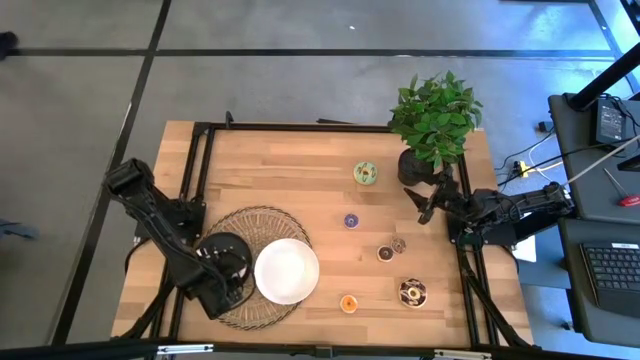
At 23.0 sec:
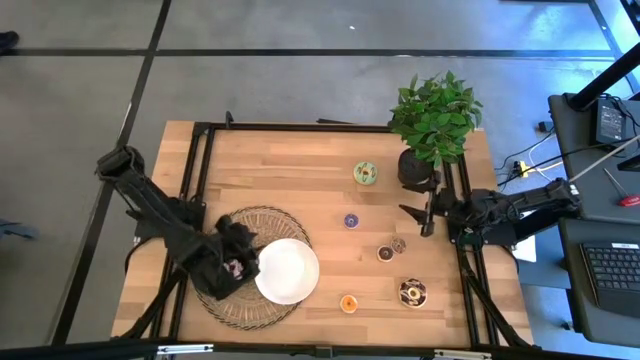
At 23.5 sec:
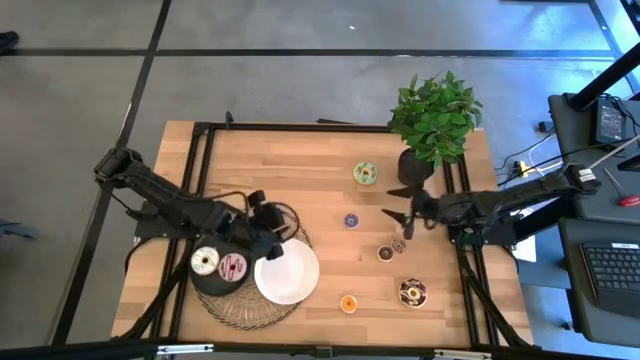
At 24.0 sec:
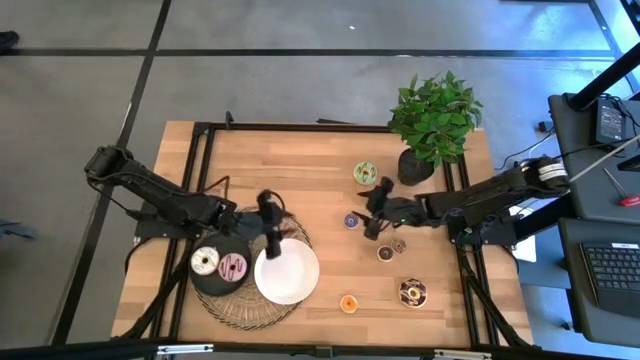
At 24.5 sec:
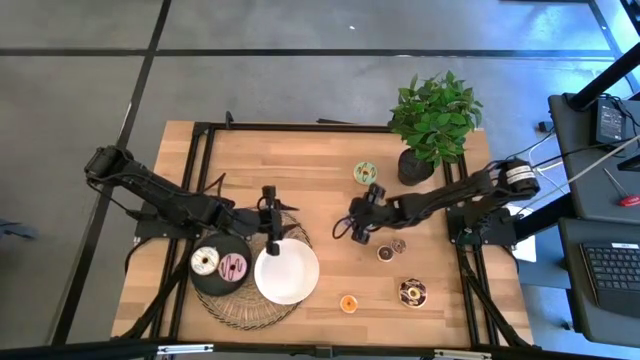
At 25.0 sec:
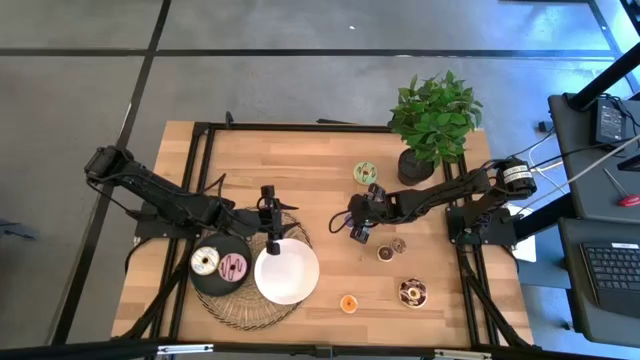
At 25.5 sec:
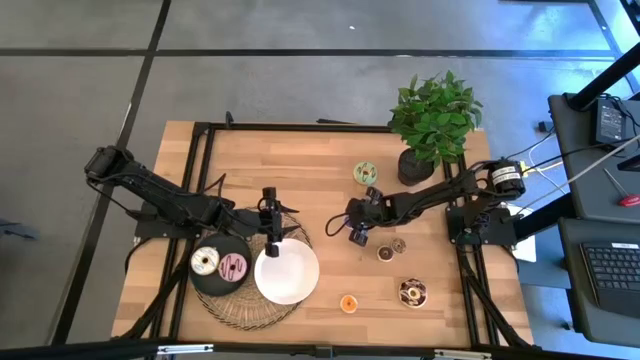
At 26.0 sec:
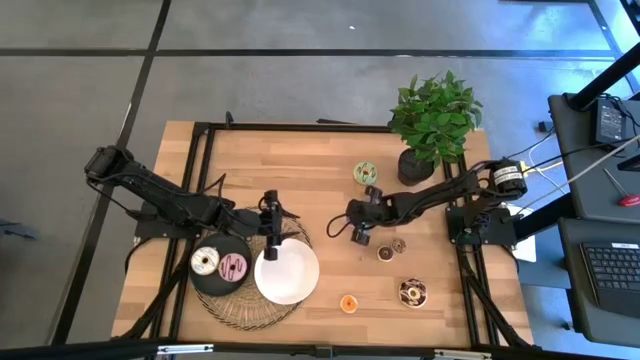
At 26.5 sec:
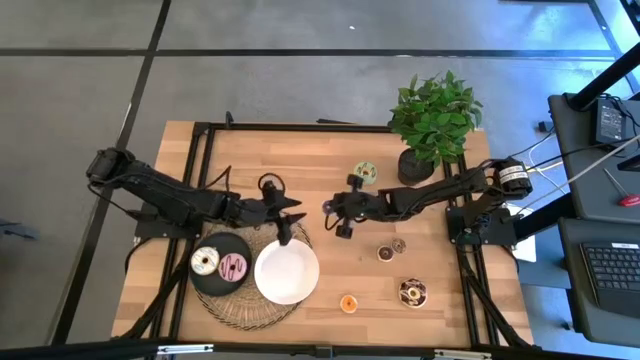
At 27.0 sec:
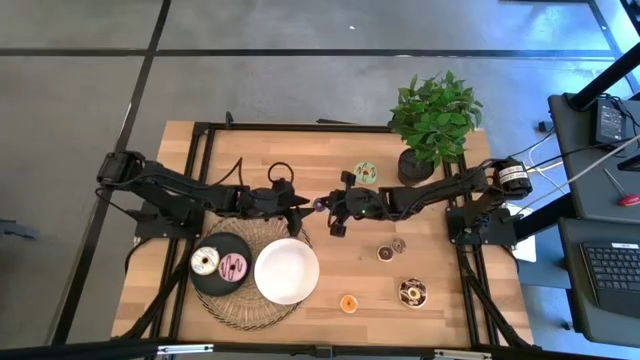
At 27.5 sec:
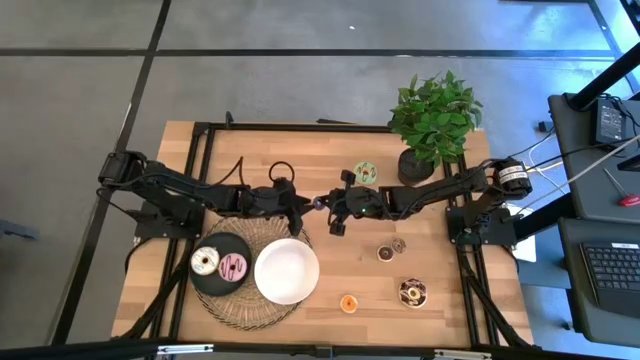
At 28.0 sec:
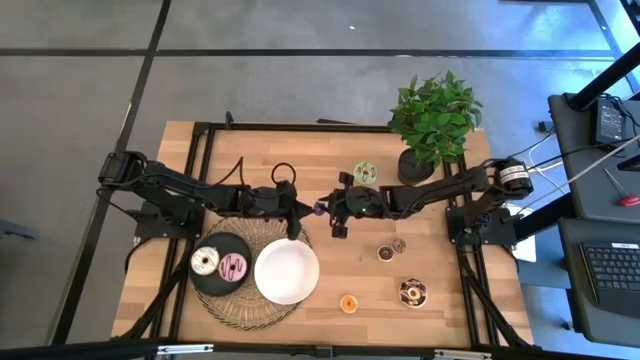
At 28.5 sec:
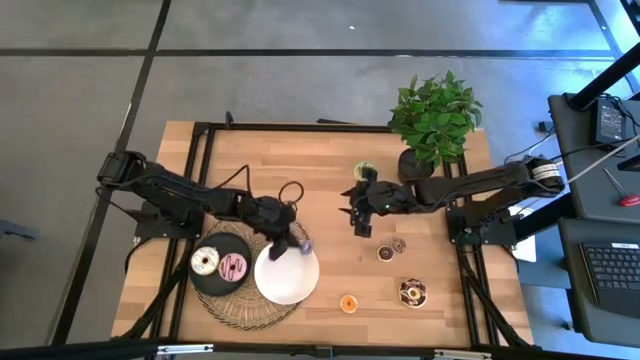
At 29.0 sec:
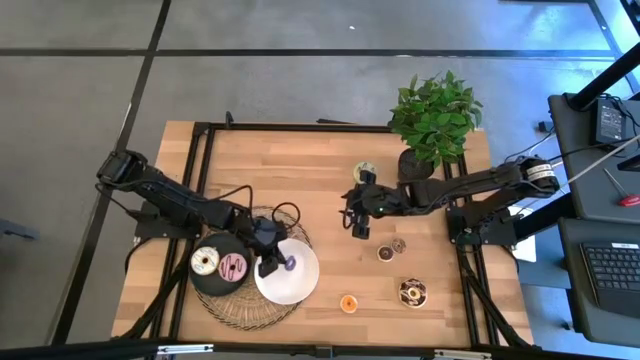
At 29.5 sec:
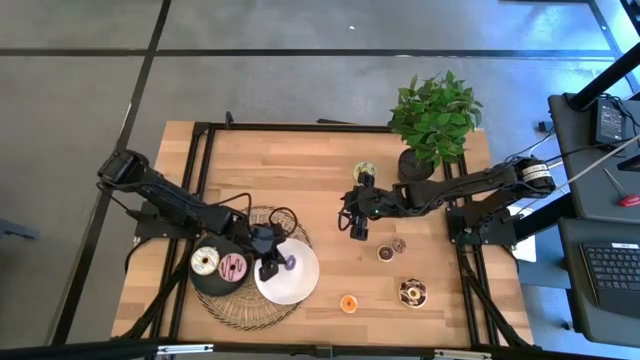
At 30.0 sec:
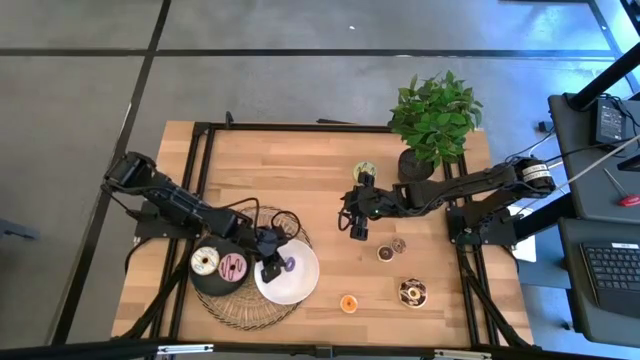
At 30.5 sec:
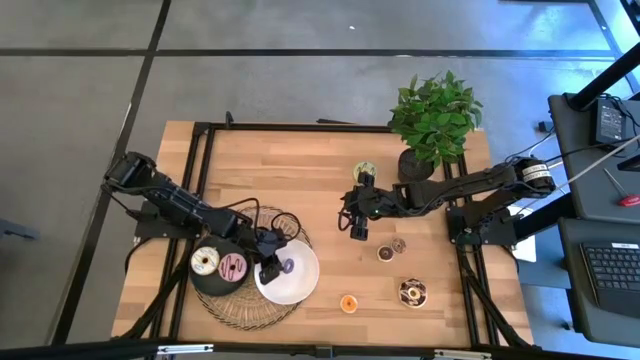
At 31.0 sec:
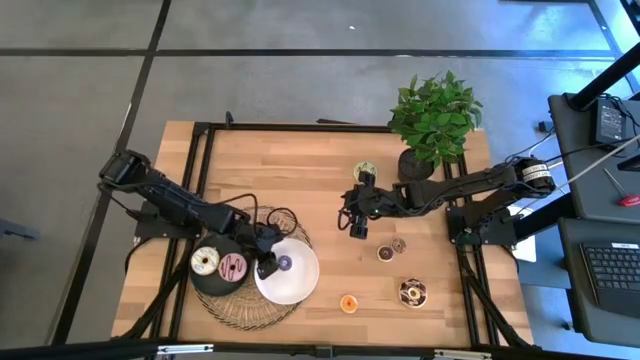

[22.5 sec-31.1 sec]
Task: Pick & Place donuts
Put the small blue donut on the white plate

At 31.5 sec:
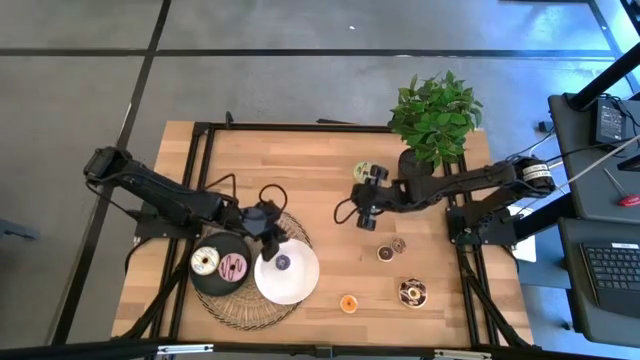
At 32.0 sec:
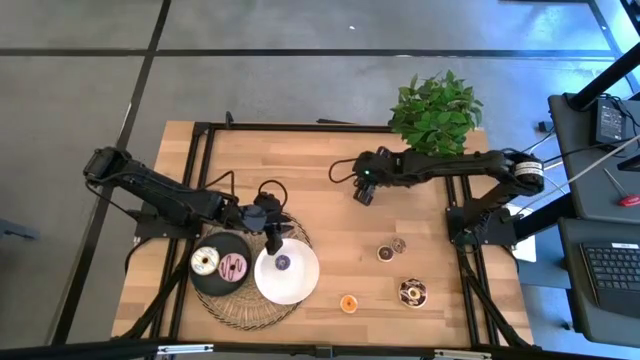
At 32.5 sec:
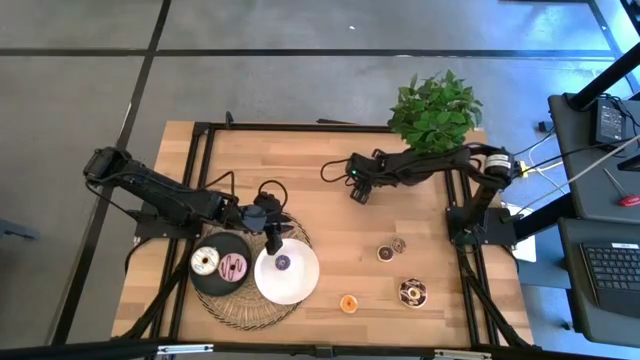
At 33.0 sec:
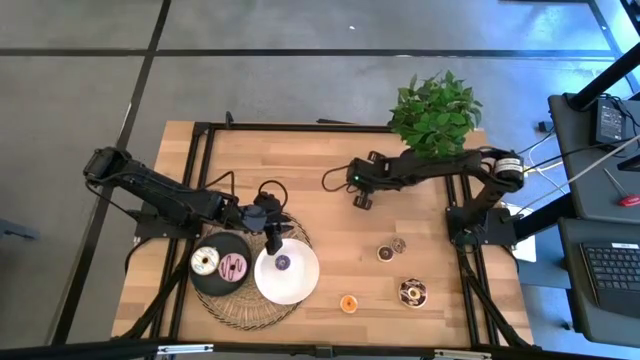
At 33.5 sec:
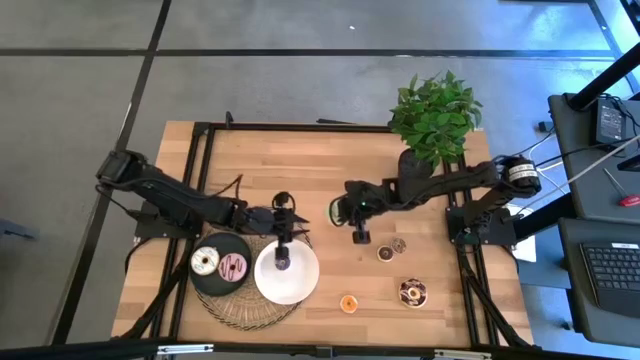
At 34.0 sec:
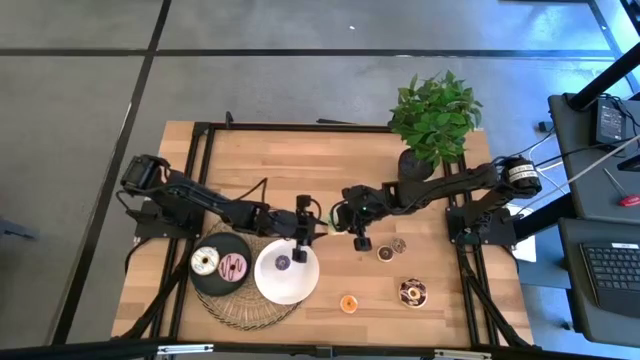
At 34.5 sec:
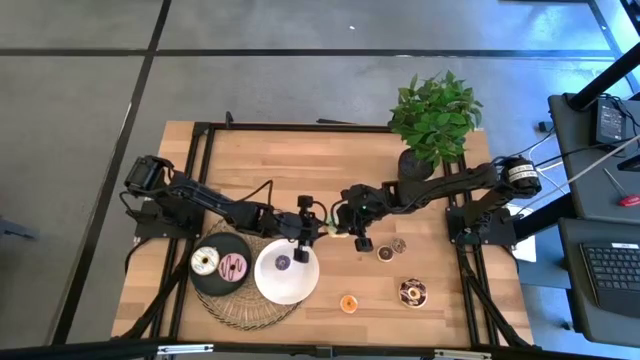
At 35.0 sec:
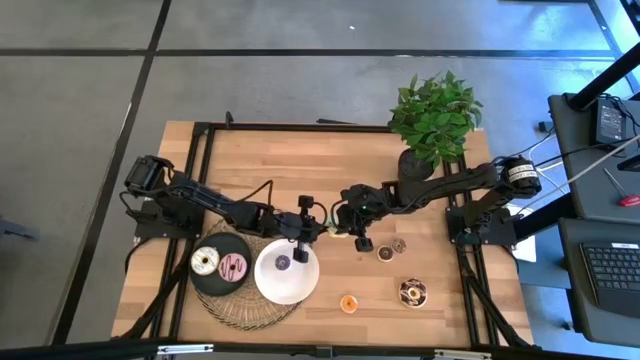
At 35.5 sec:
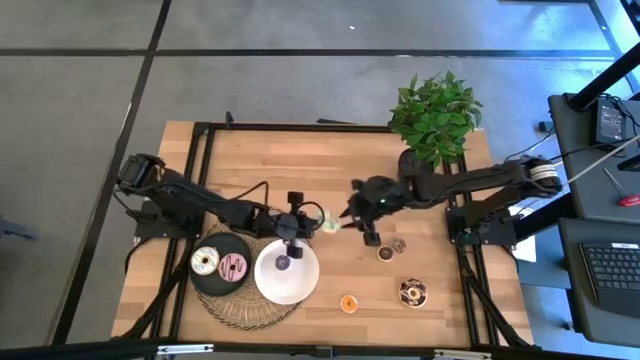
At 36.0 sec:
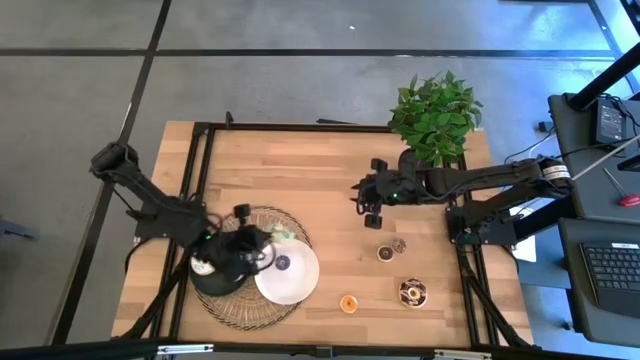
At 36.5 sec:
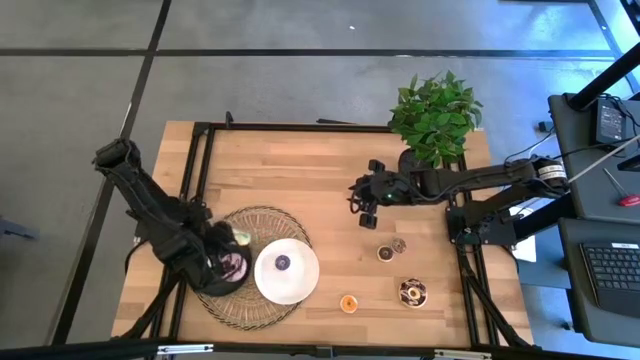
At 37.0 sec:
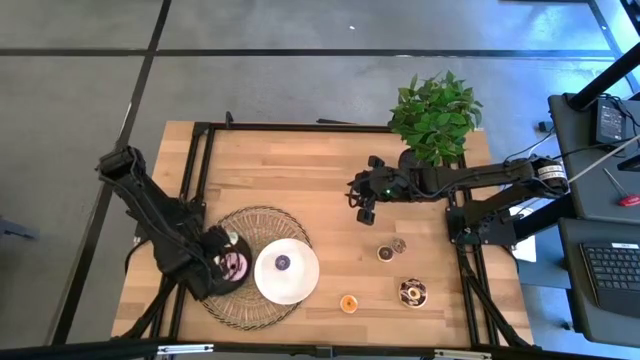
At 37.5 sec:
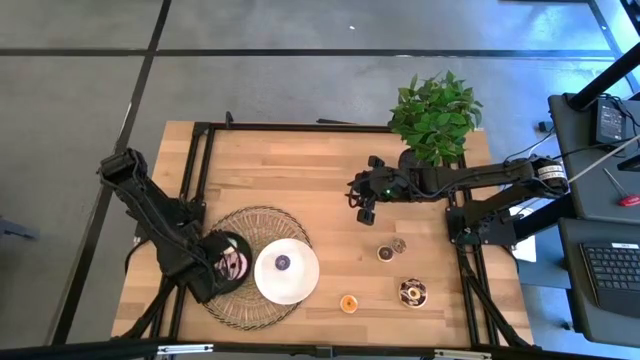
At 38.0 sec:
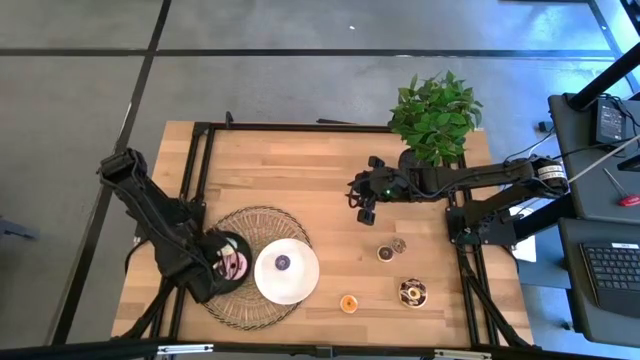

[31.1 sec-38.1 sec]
Put the large light blue donut on the black plate

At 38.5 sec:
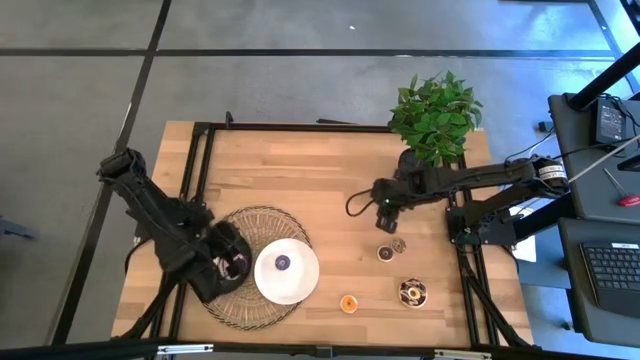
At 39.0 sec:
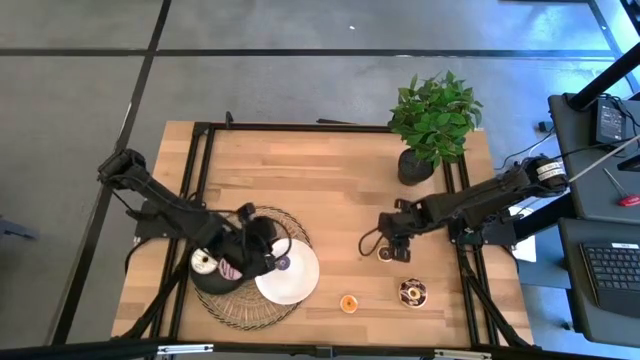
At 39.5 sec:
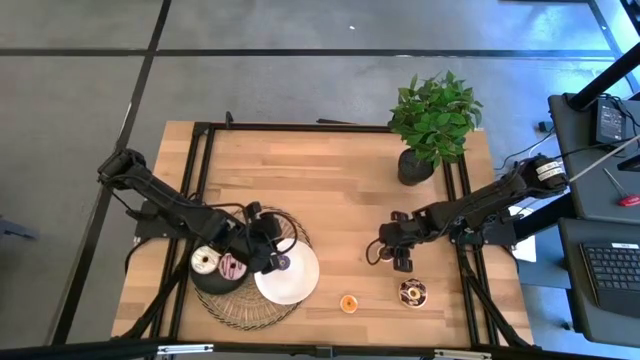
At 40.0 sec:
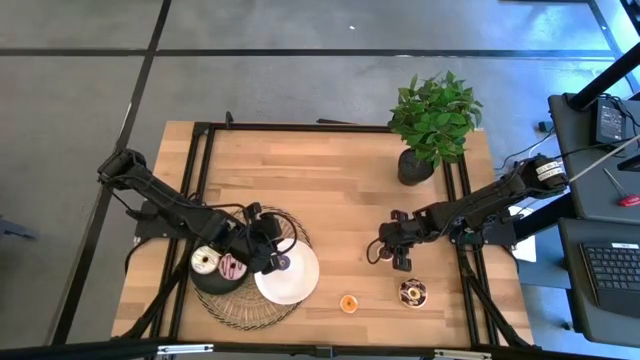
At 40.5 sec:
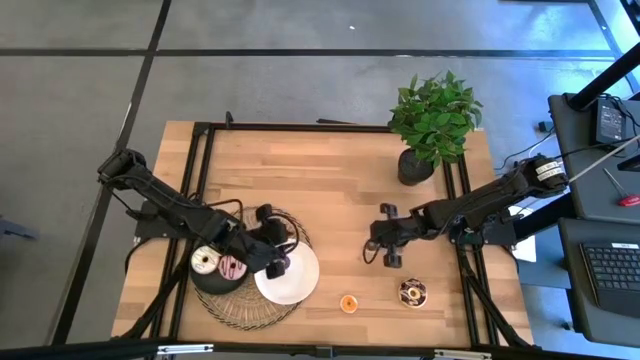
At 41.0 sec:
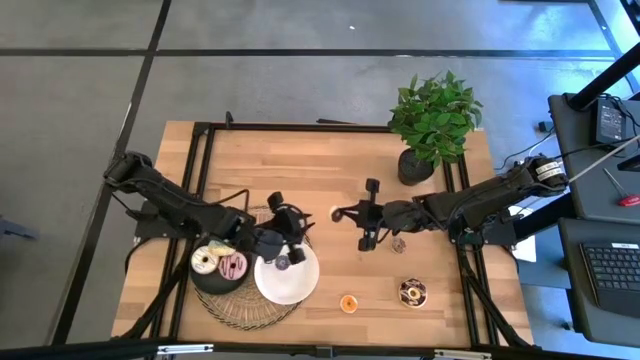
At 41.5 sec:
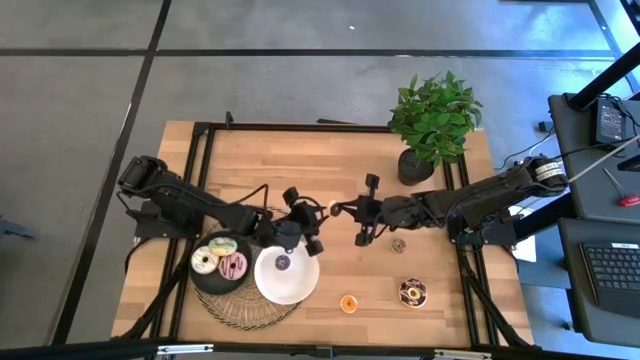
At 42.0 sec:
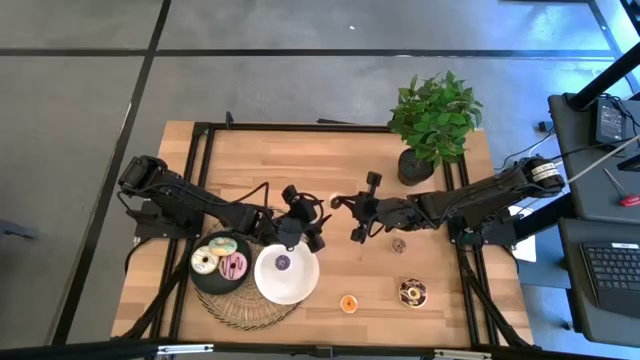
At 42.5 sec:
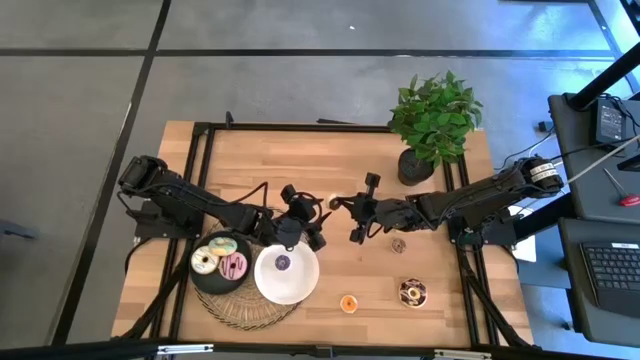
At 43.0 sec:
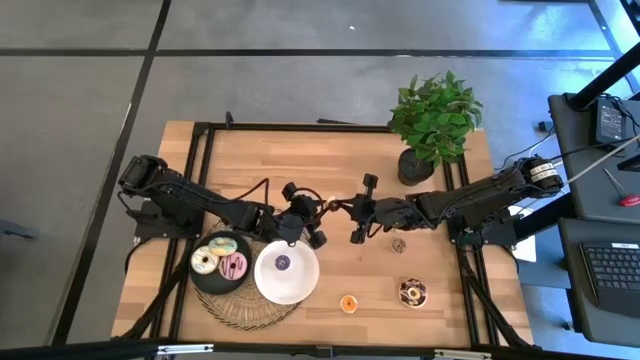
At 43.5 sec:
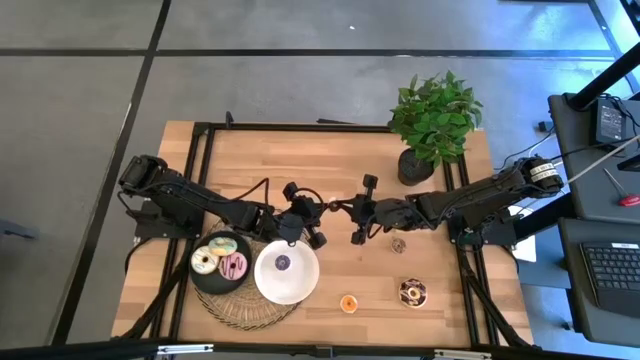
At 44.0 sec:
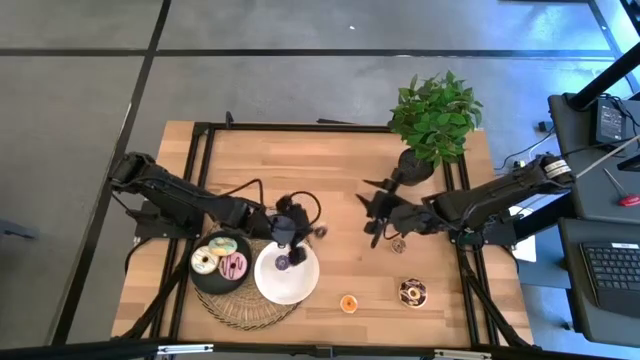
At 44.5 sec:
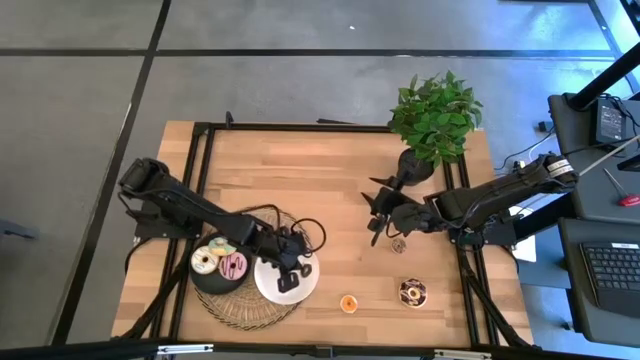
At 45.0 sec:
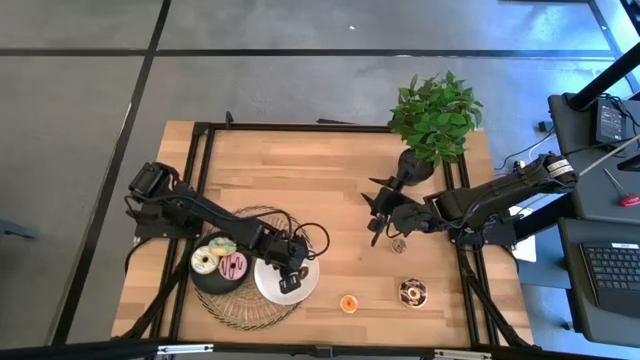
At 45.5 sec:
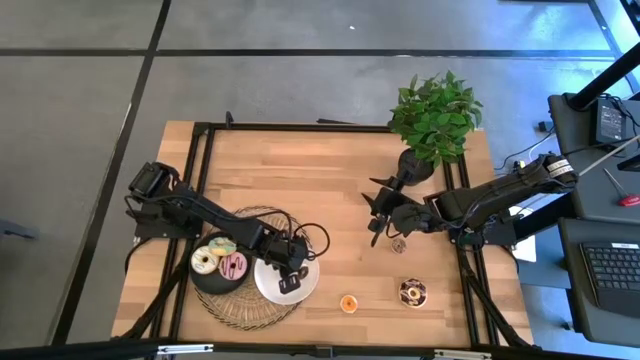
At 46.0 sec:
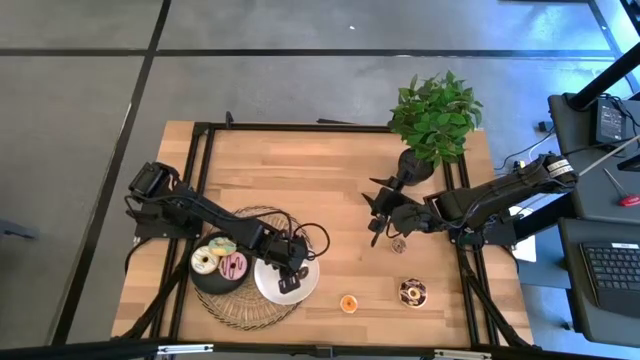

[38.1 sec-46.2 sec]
Put the left small brown donut on the white plate
